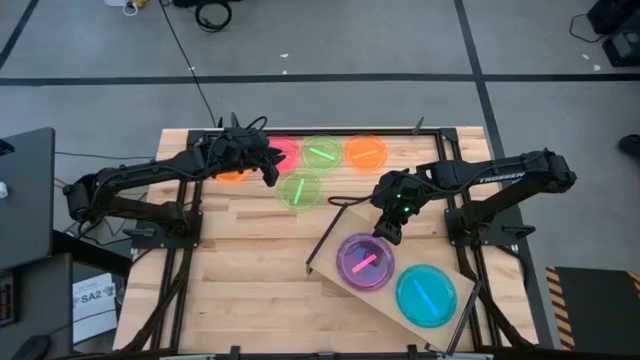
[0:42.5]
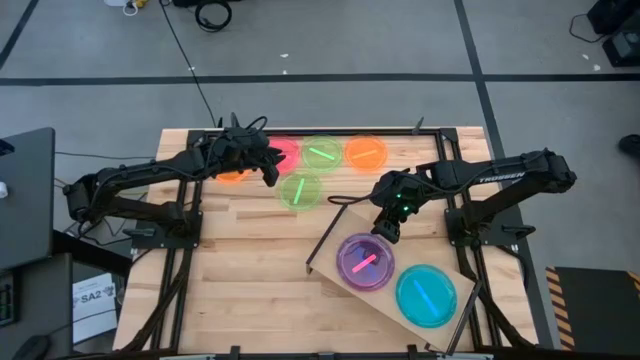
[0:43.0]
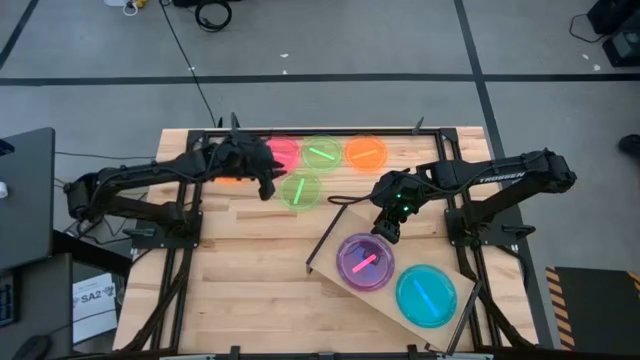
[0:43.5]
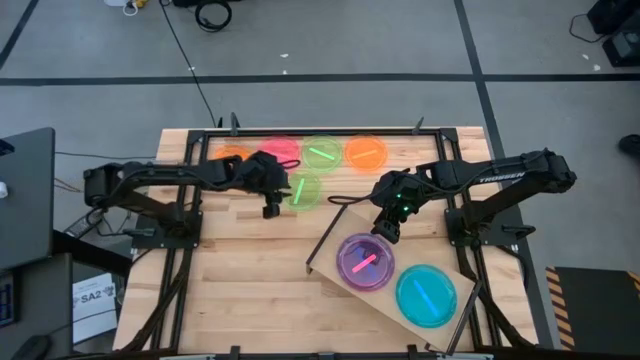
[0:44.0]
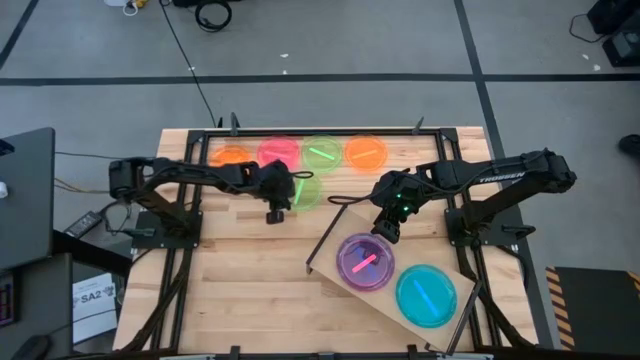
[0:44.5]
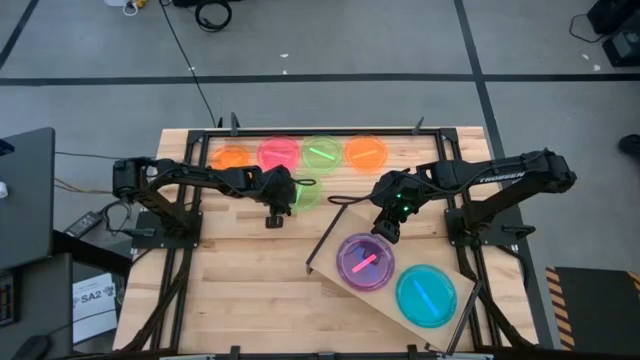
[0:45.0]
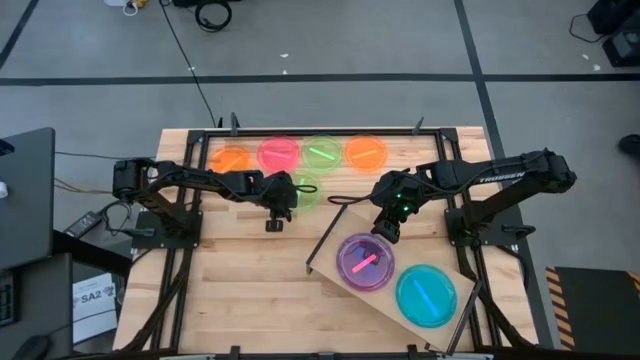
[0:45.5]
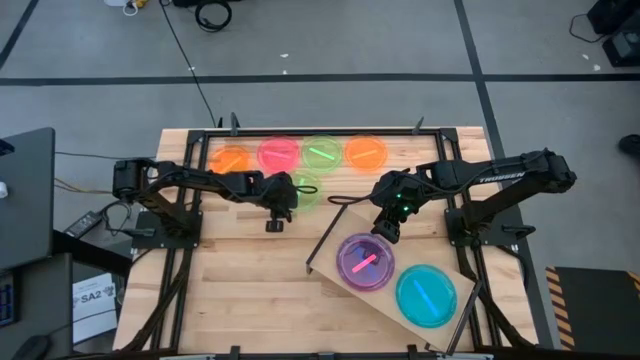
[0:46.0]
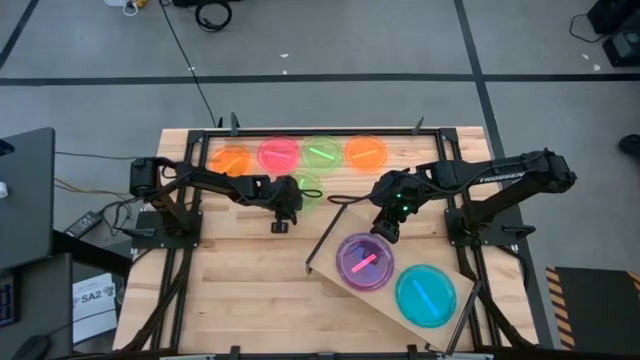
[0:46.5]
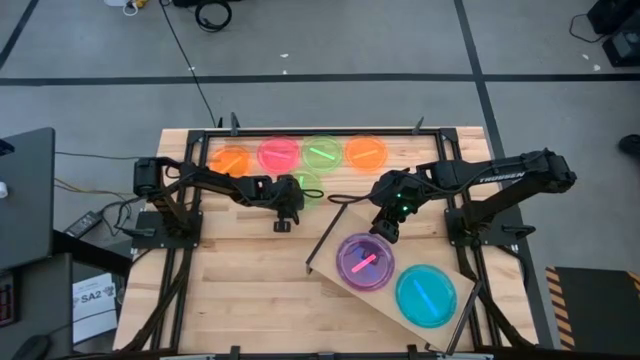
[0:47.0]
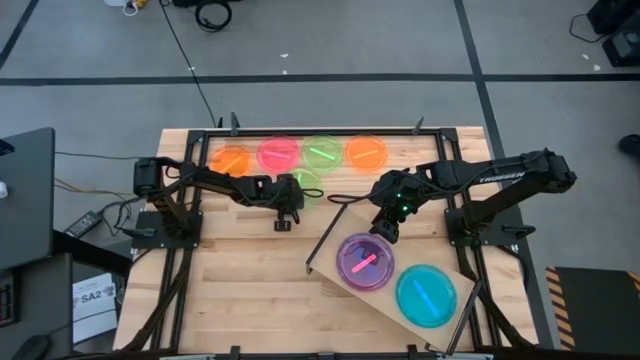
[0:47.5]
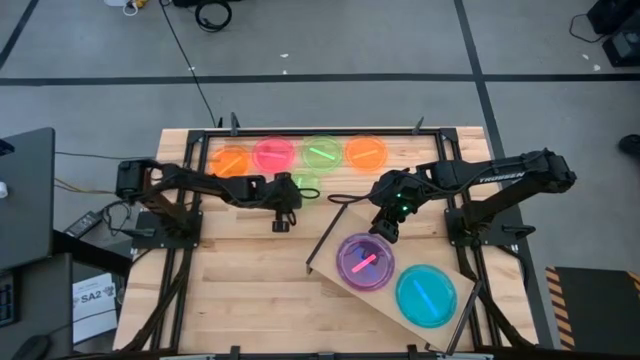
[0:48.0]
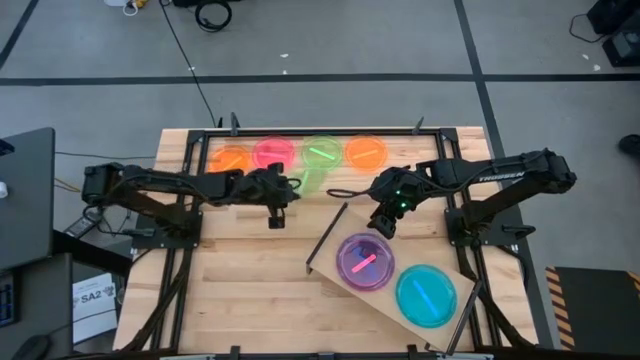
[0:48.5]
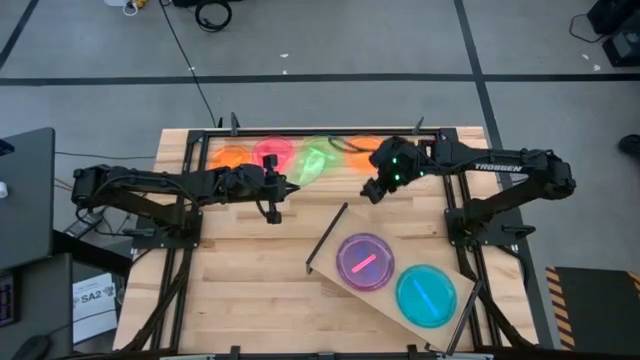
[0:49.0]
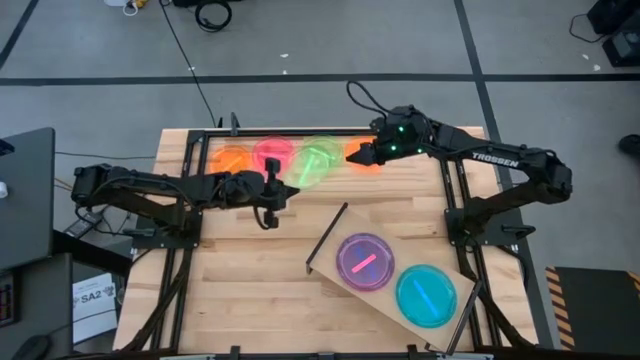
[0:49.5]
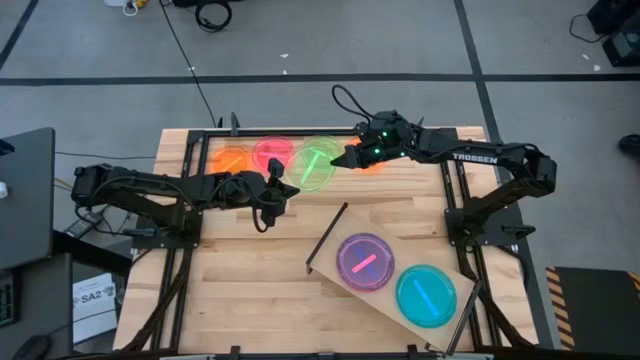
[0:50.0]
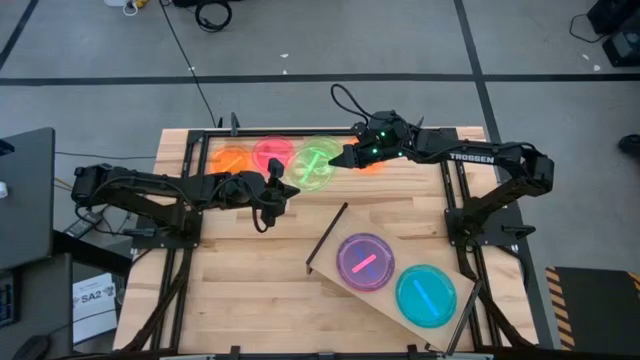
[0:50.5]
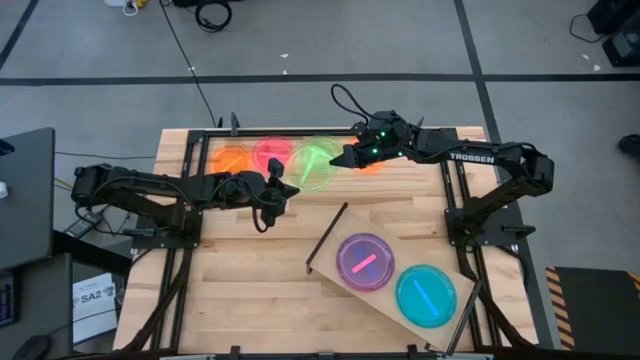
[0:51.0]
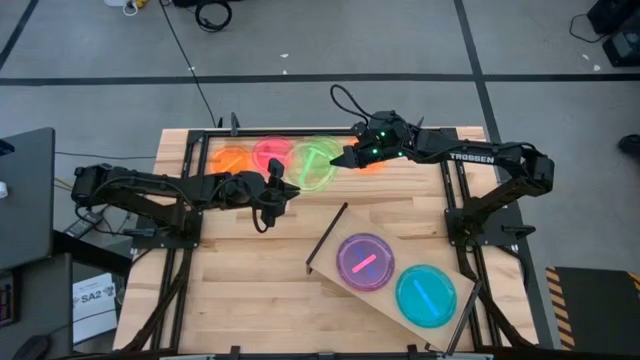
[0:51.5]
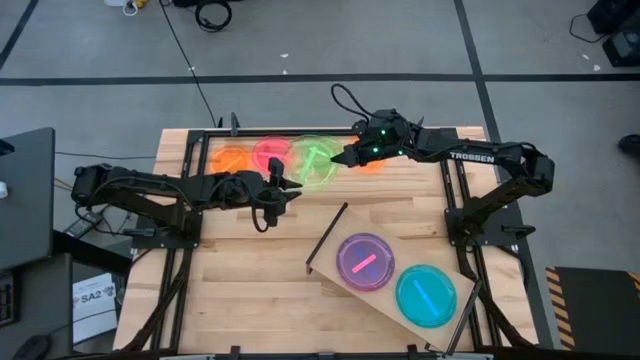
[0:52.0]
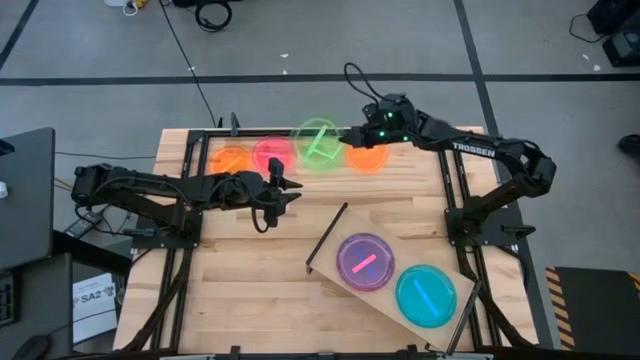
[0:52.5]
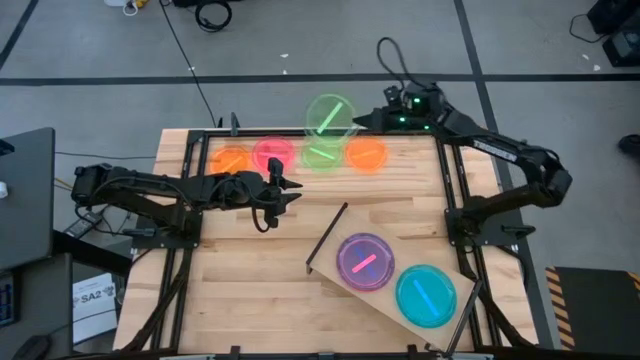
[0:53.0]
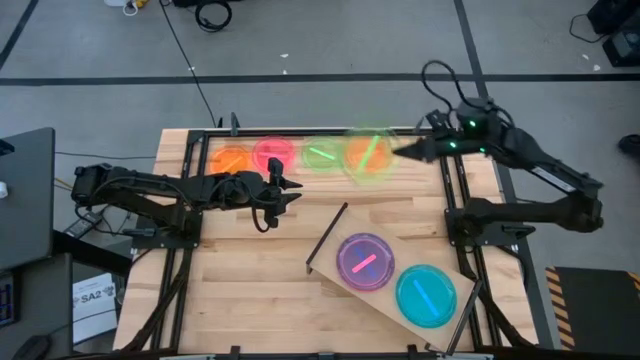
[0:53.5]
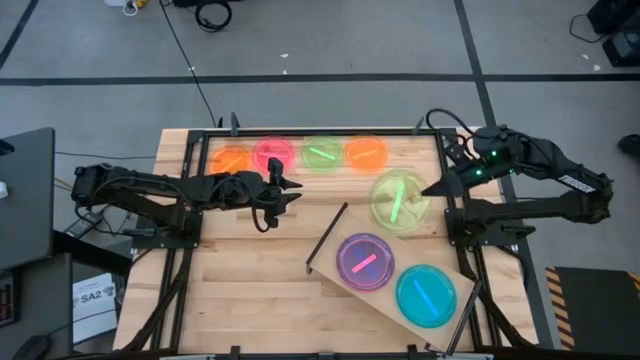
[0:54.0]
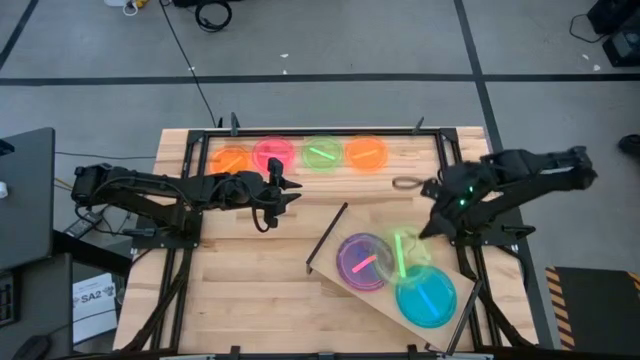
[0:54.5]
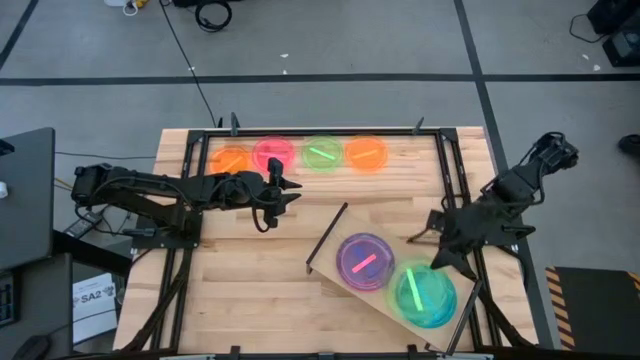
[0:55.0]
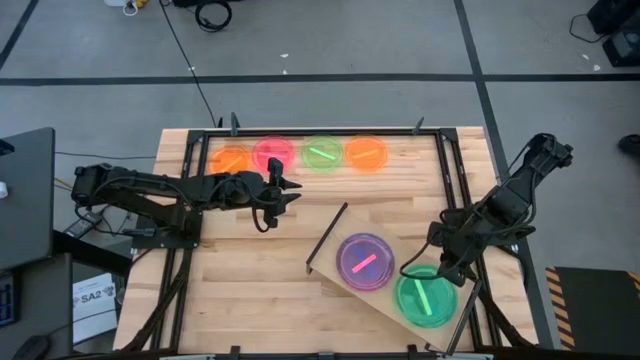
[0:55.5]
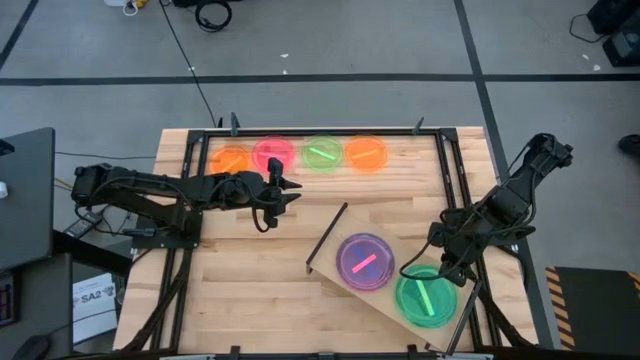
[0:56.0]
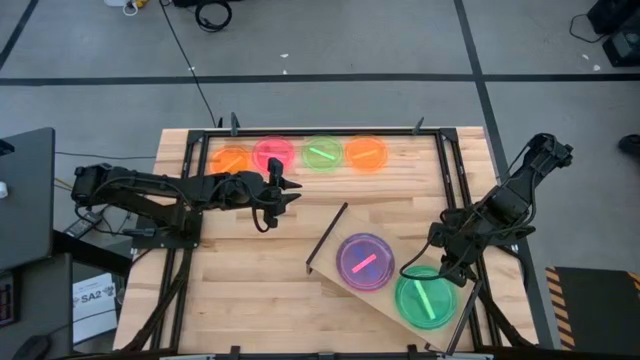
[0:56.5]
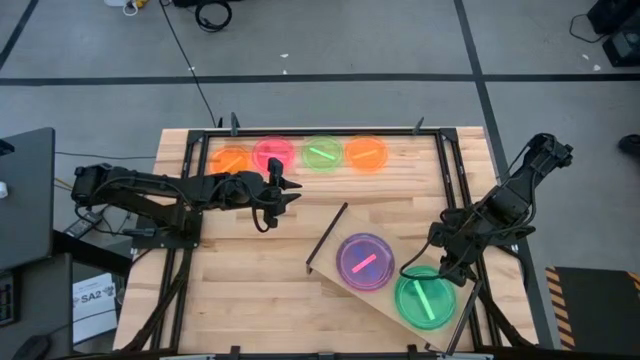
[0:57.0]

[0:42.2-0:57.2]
Task: Place and stack plates onto a shelf
Stack the bottom transparent green plate on the transparent blue plate on the shelf

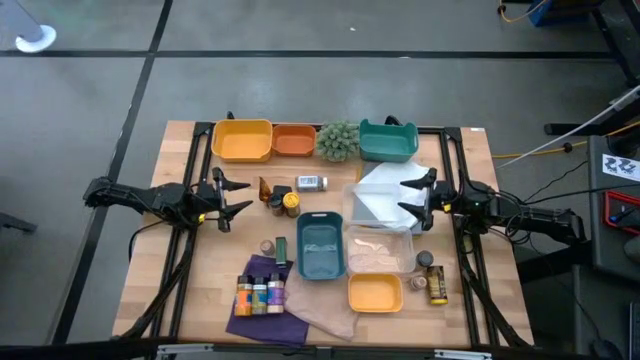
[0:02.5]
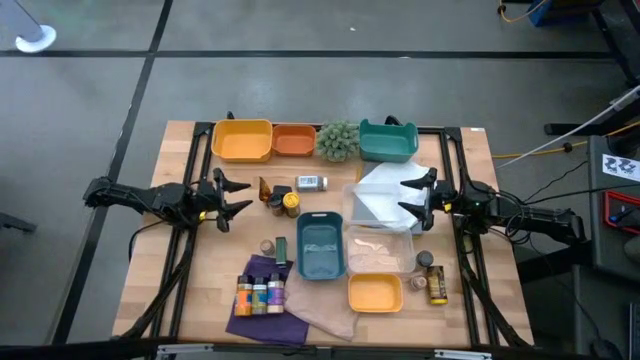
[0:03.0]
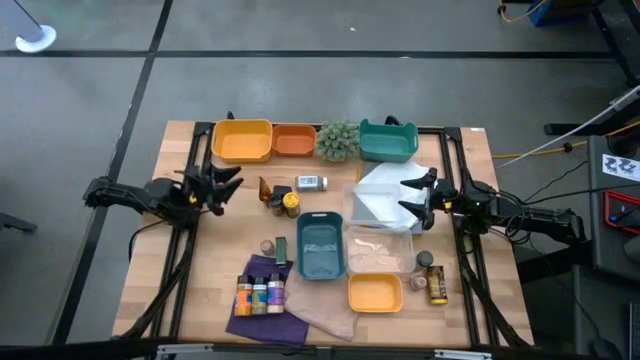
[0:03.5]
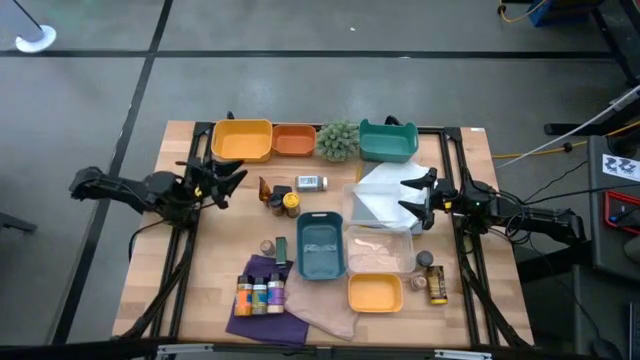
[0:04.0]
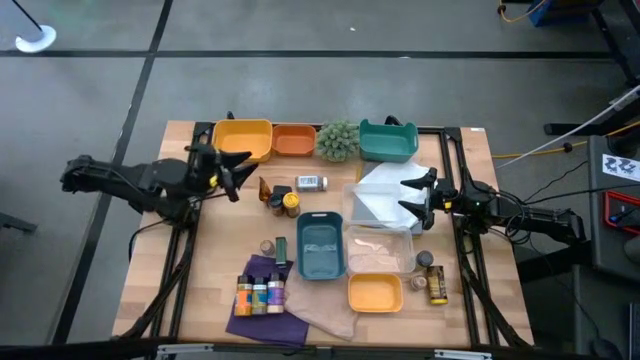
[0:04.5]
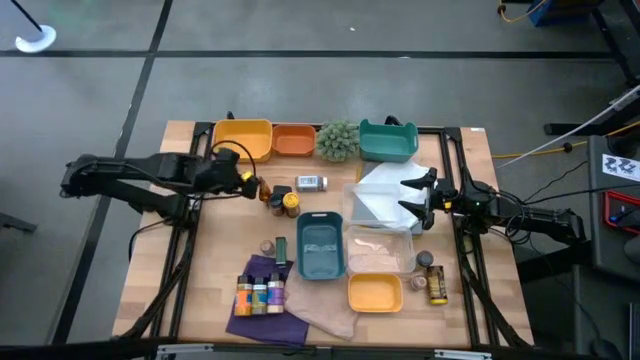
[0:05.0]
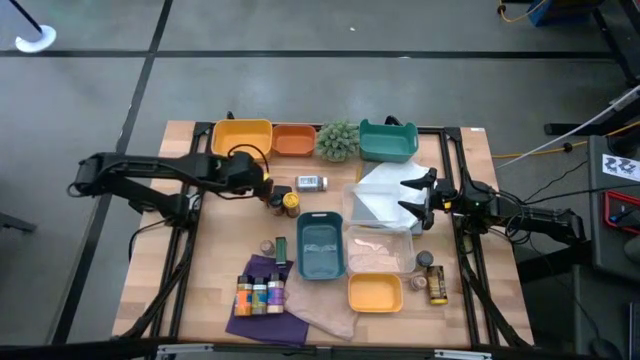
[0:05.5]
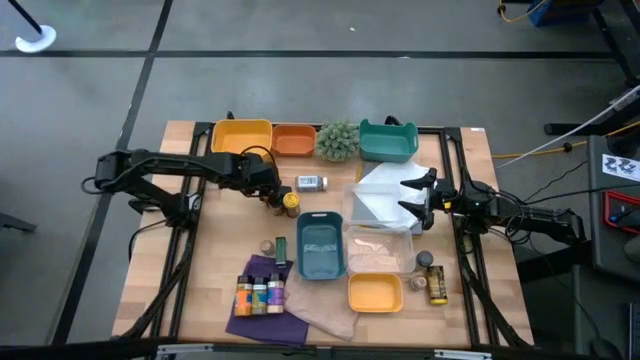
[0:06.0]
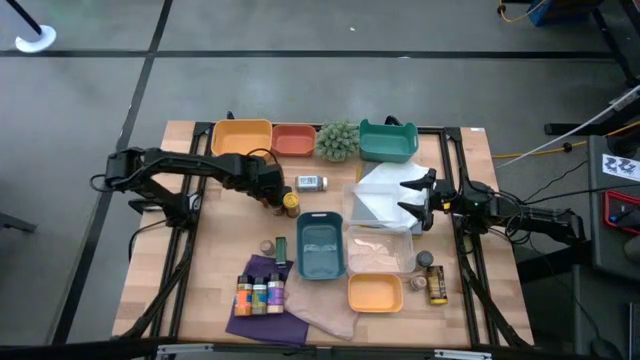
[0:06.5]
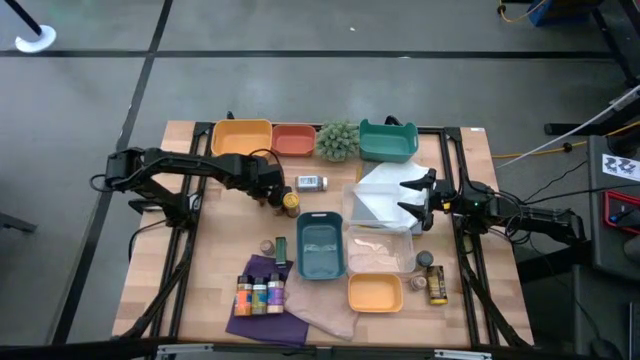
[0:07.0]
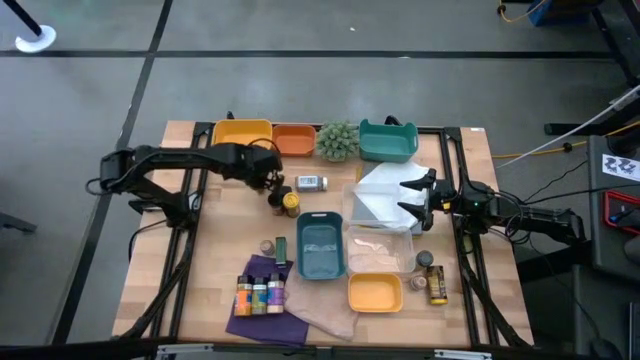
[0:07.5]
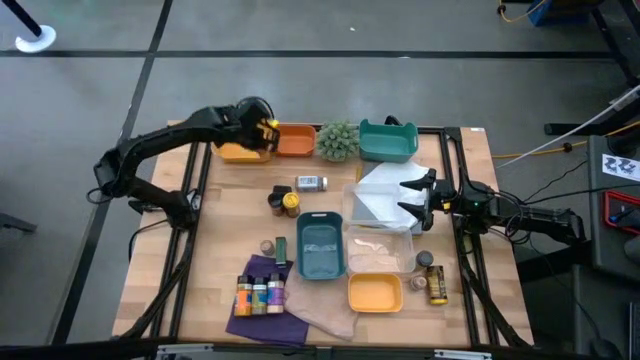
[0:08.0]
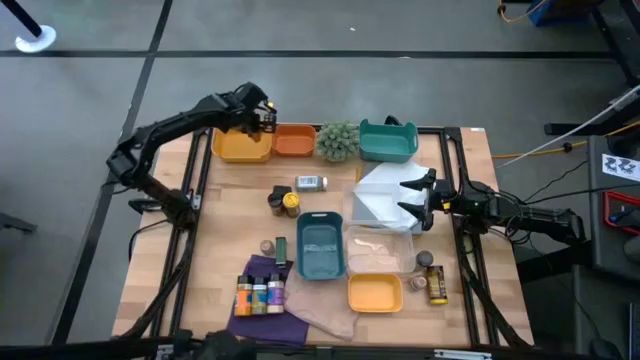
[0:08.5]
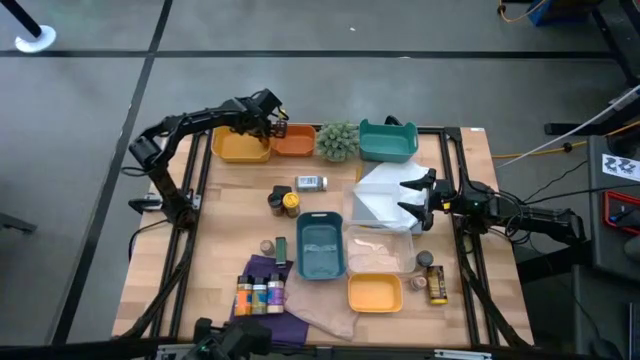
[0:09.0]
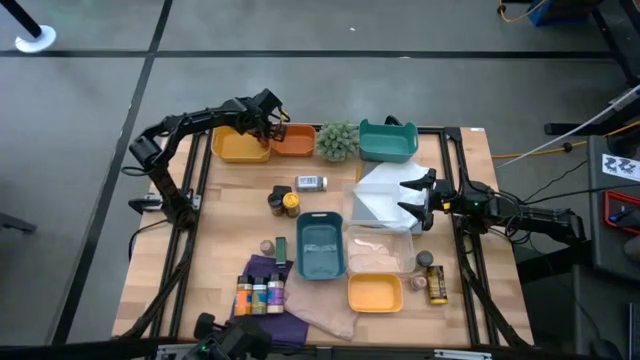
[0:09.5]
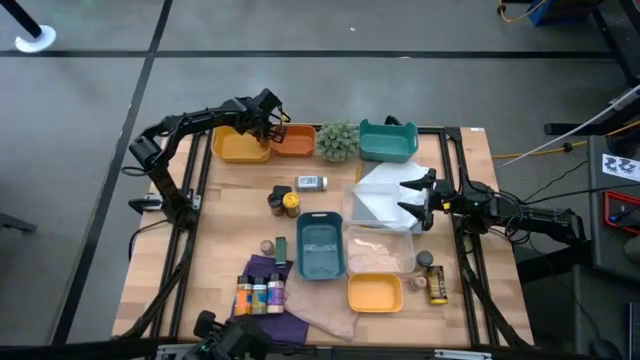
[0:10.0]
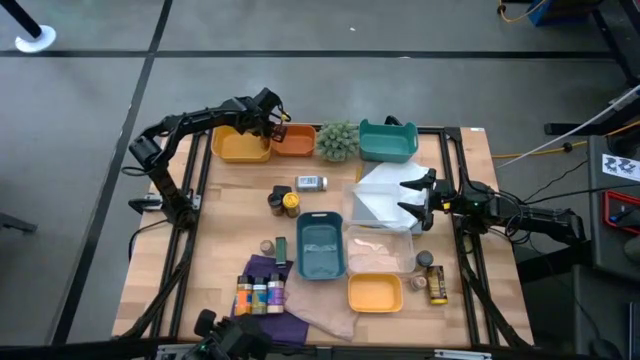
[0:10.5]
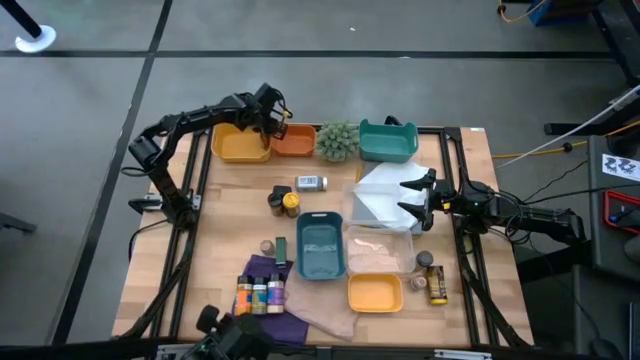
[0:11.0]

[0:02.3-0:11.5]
Task: Sort spices by type
Put the orange seasoning pack into the top yellow bin
